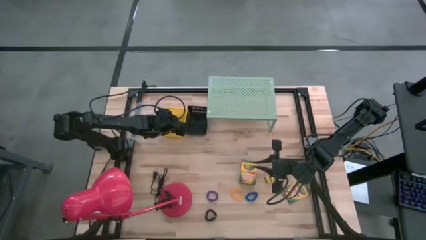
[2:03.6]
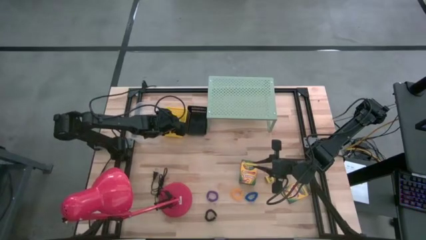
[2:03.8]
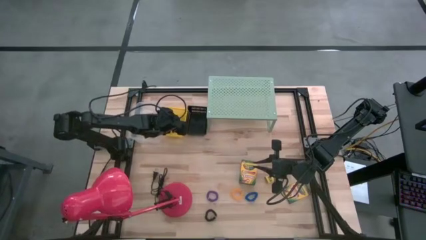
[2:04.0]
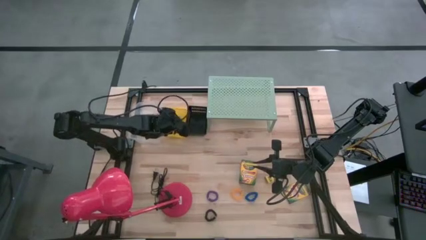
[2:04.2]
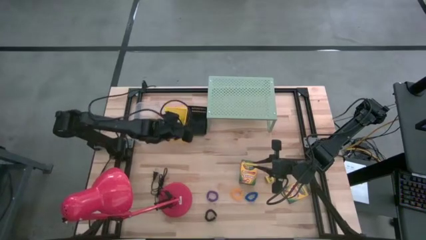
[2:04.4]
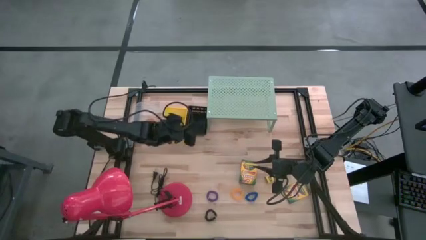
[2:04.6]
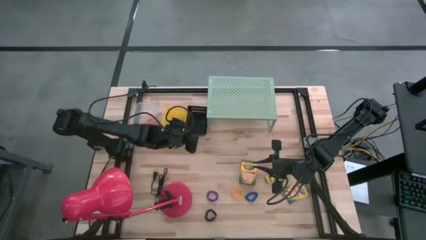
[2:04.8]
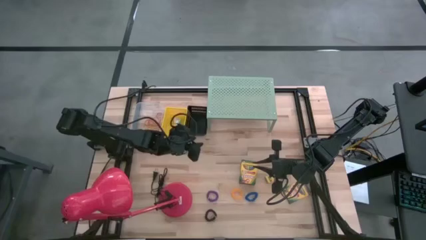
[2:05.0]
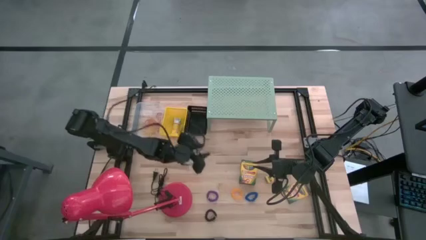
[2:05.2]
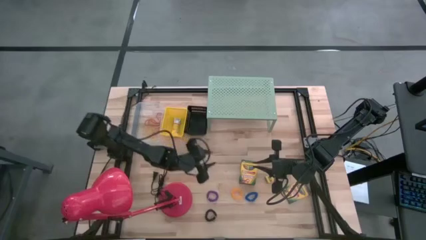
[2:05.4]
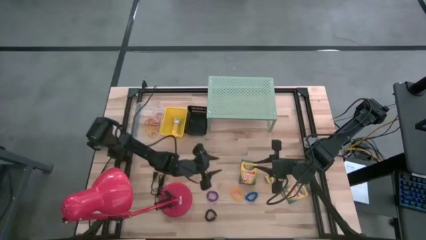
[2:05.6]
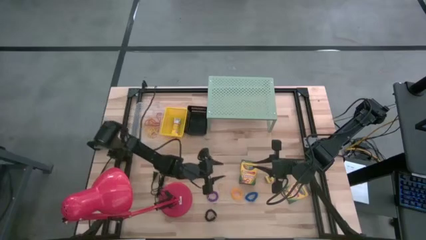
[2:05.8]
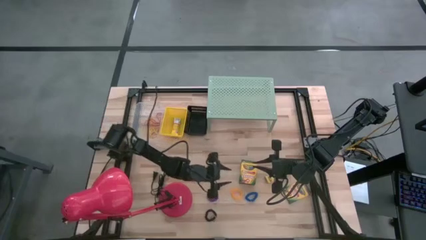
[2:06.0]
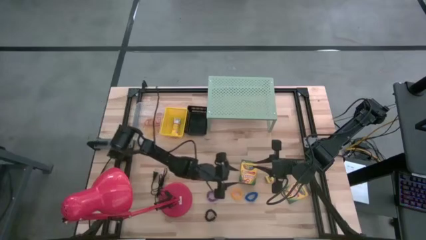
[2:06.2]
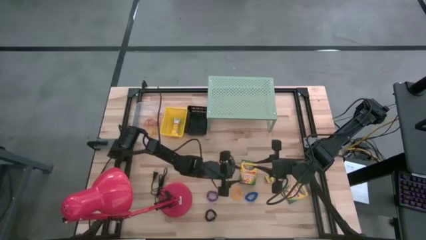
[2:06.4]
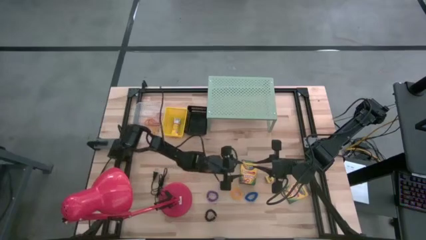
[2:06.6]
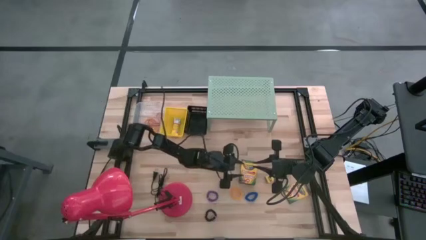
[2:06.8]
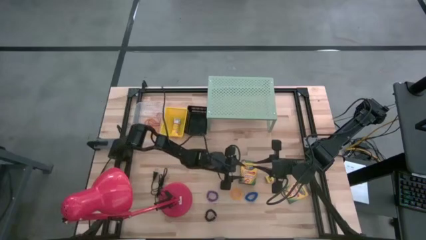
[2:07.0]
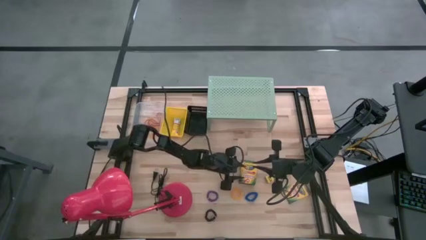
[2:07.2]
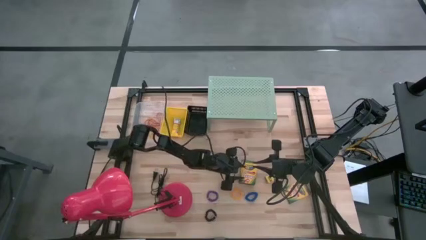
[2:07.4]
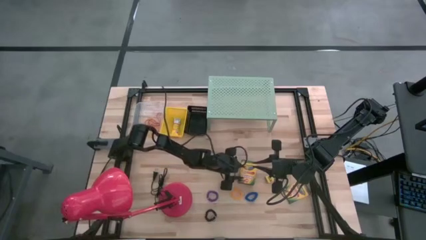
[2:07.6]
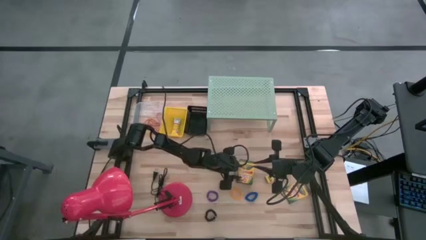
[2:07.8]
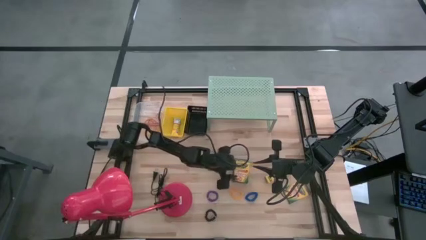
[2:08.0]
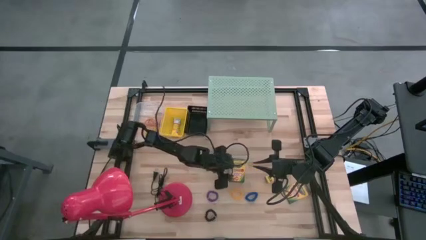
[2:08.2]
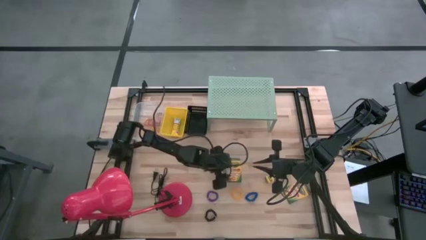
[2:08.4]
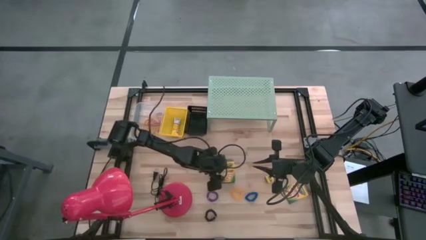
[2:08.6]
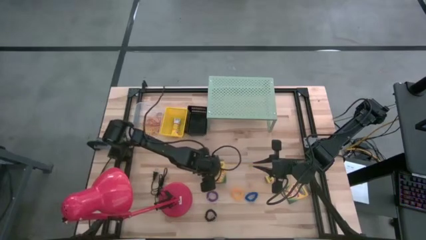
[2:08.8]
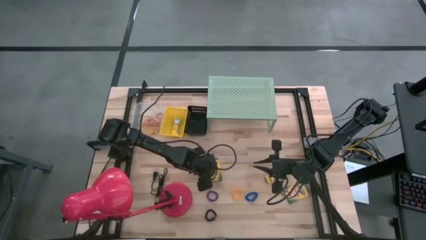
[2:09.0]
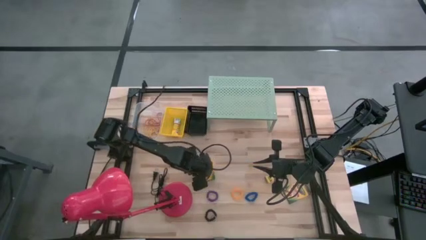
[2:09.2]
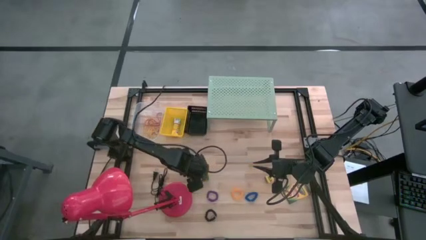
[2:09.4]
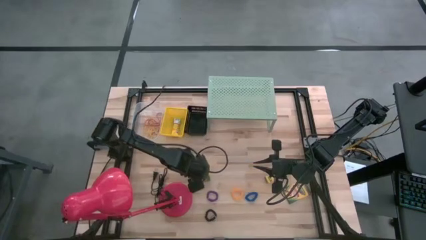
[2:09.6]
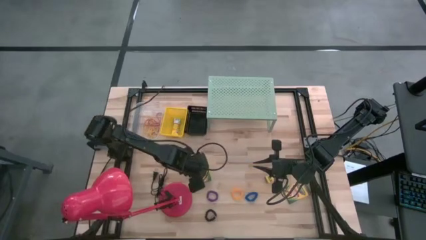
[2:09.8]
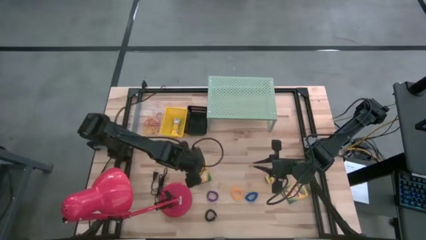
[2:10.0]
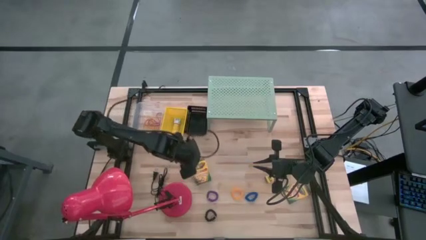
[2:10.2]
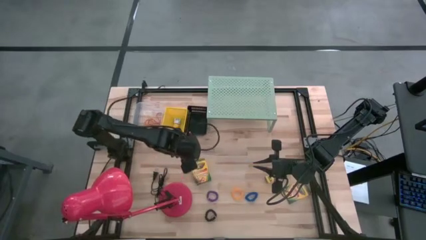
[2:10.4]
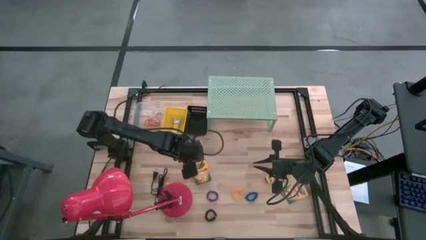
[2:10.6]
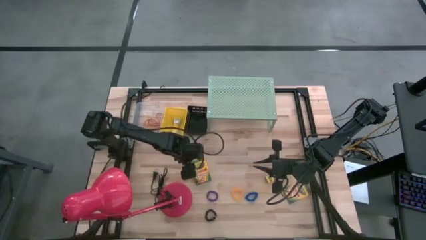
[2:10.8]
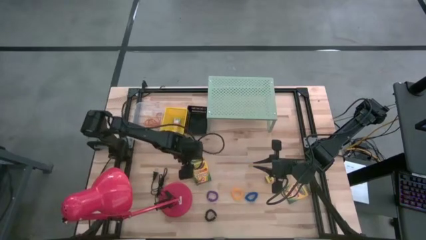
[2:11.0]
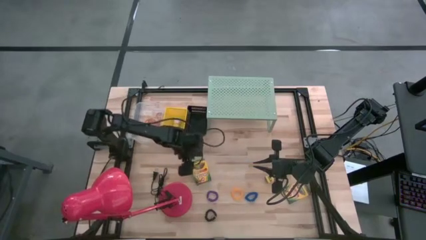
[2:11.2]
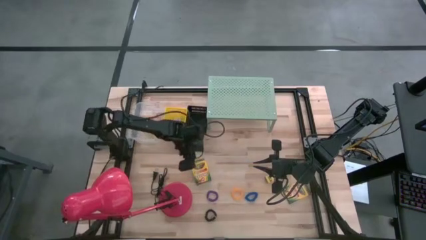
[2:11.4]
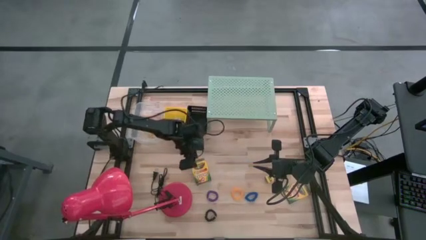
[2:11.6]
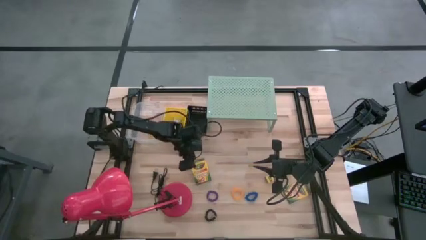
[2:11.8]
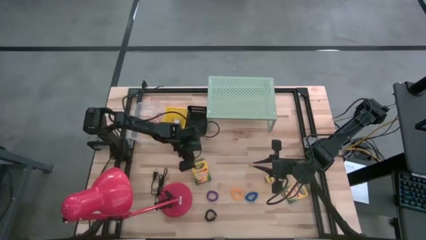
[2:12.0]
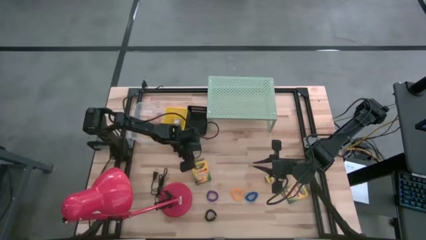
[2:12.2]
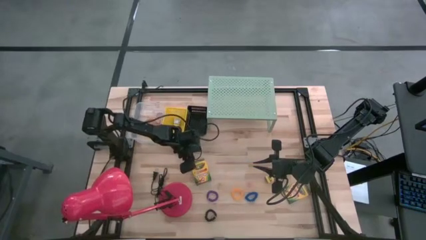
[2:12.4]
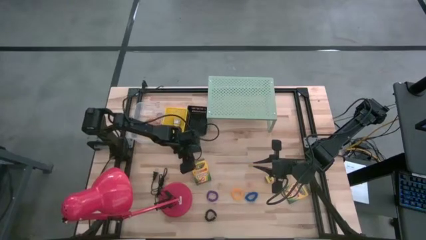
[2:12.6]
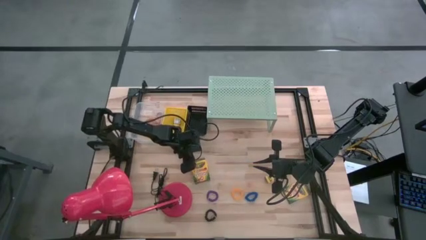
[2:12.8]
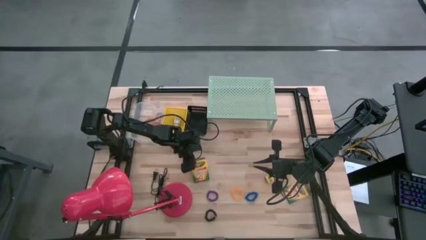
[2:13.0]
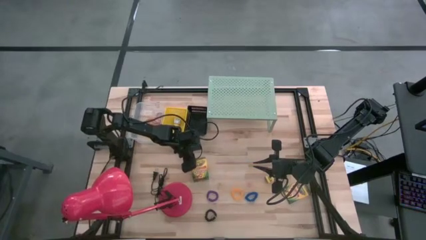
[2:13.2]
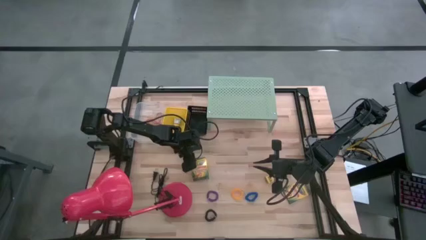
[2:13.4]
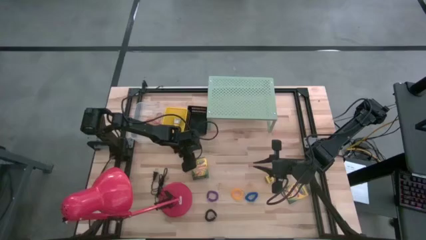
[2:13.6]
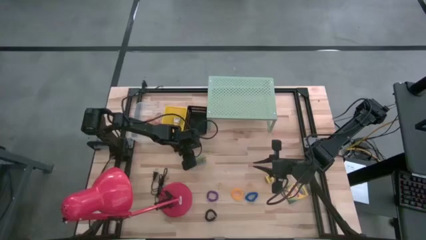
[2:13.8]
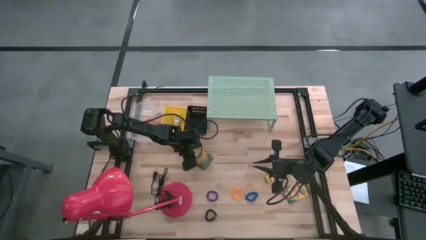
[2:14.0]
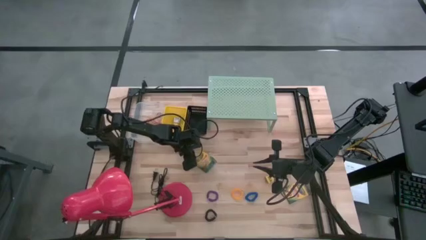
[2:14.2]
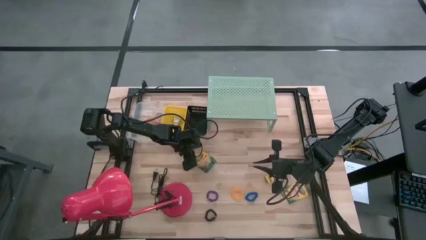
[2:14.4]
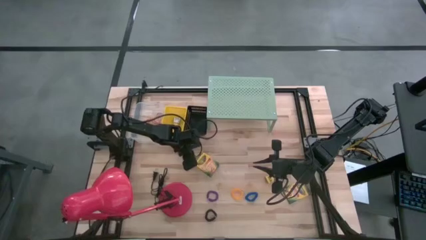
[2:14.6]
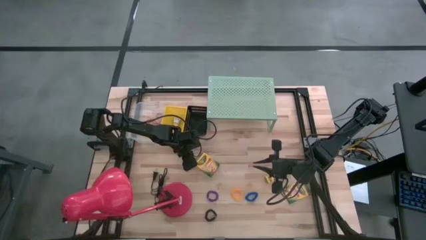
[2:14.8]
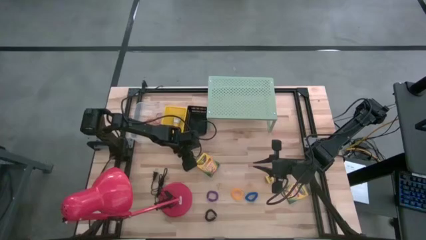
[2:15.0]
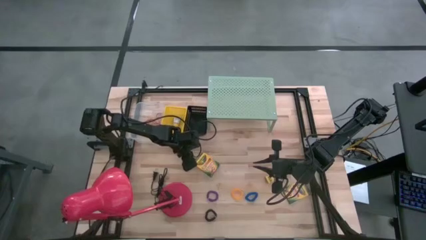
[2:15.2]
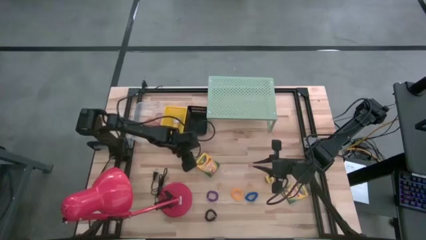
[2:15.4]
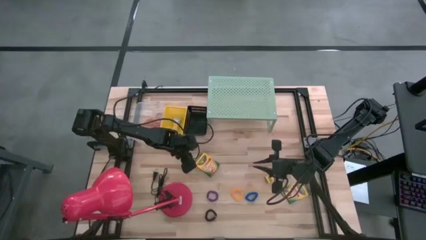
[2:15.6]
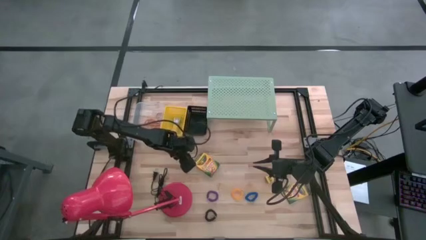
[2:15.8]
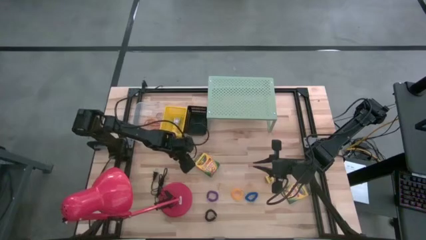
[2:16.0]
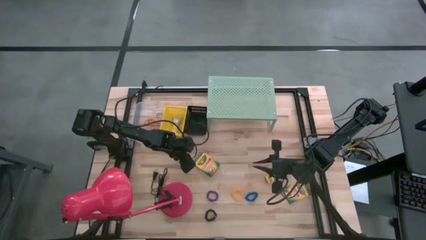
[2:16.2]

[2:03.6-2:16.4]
Task: Pick & Place Office Desk Supplies
Put the crayon into the yellow bin

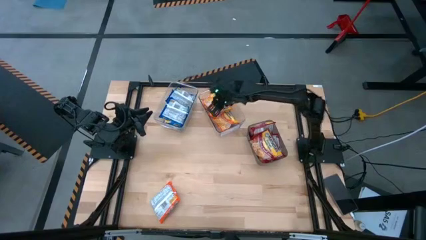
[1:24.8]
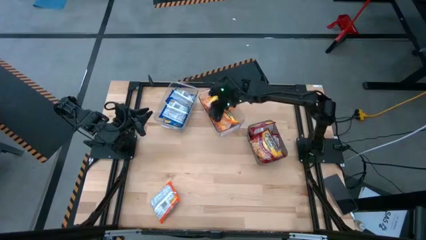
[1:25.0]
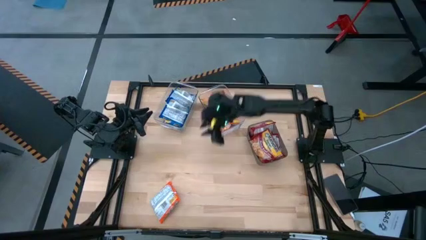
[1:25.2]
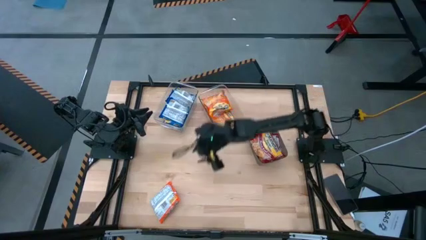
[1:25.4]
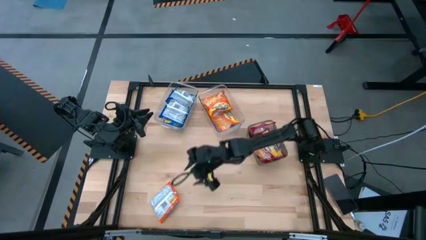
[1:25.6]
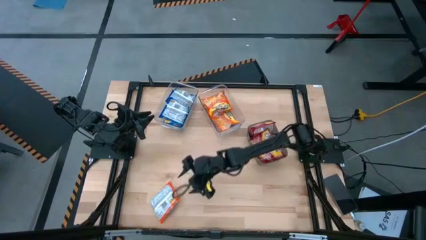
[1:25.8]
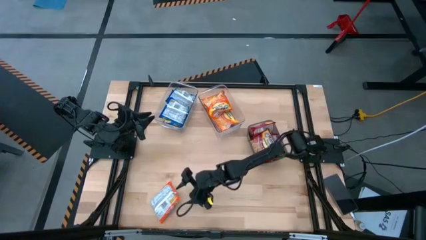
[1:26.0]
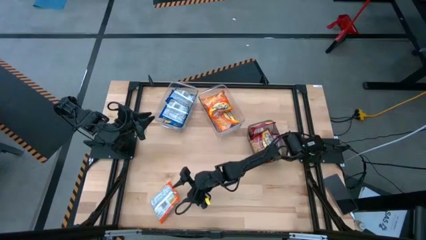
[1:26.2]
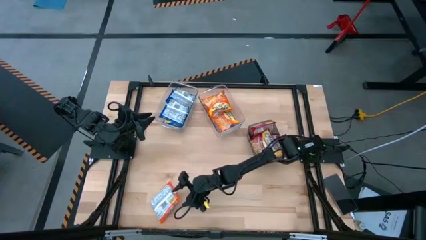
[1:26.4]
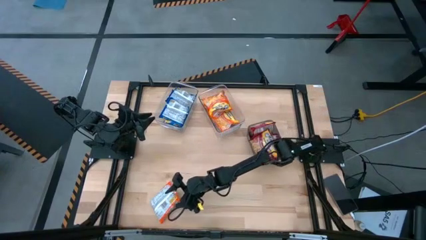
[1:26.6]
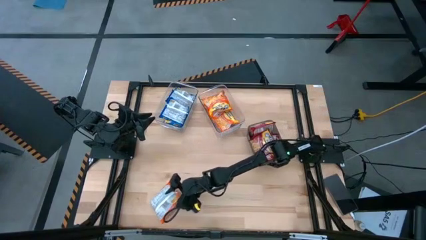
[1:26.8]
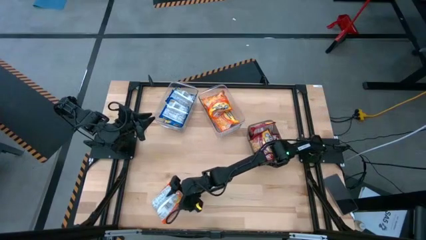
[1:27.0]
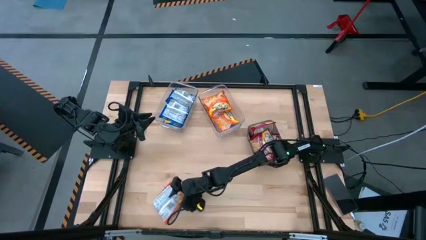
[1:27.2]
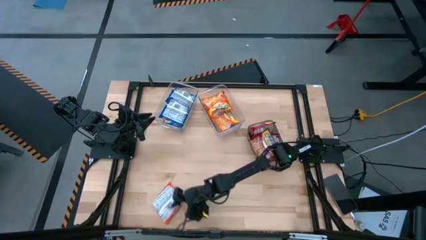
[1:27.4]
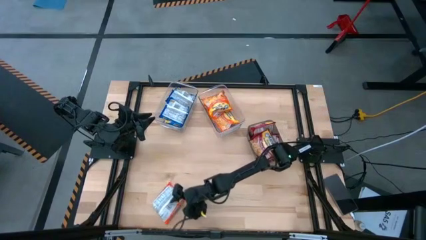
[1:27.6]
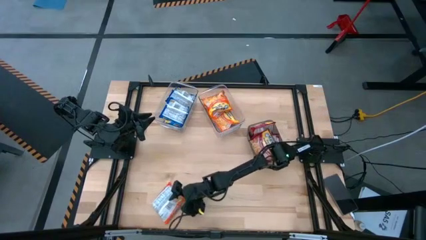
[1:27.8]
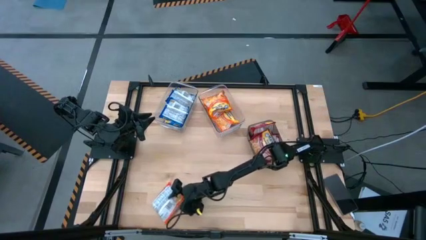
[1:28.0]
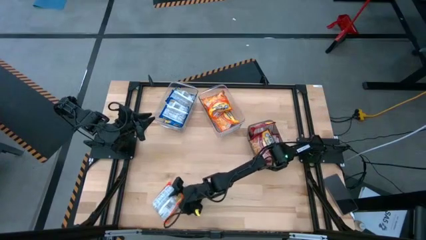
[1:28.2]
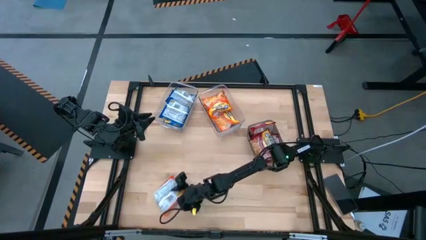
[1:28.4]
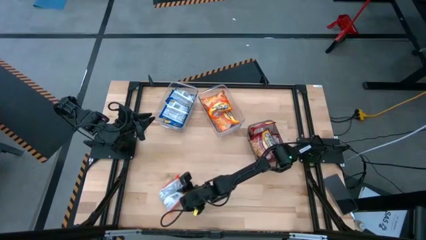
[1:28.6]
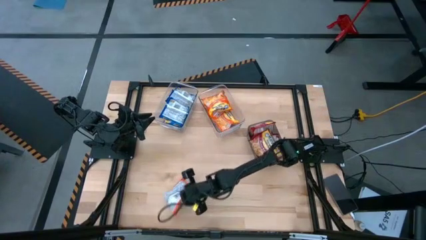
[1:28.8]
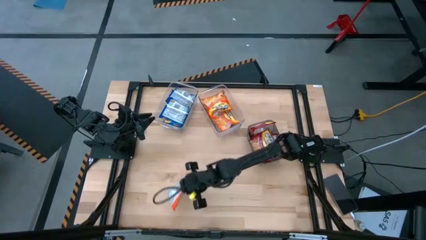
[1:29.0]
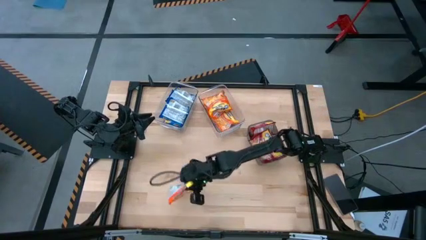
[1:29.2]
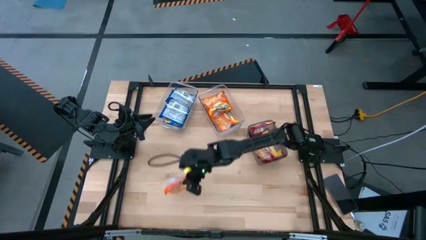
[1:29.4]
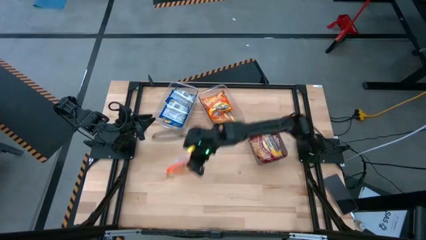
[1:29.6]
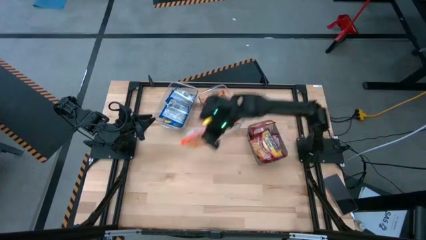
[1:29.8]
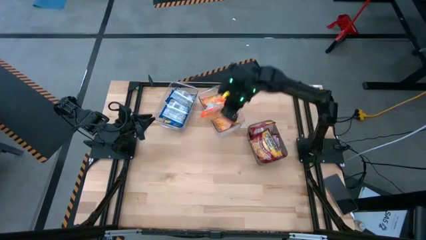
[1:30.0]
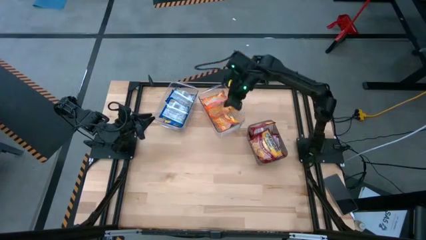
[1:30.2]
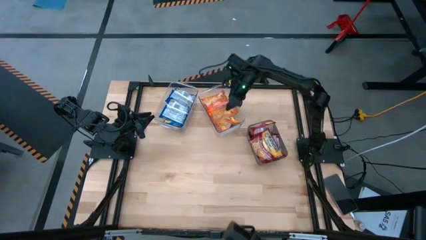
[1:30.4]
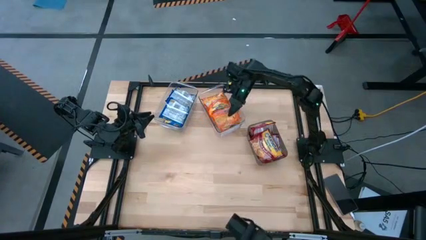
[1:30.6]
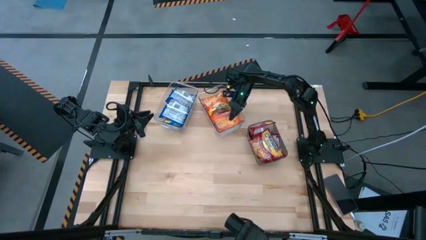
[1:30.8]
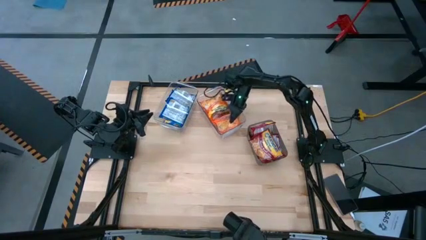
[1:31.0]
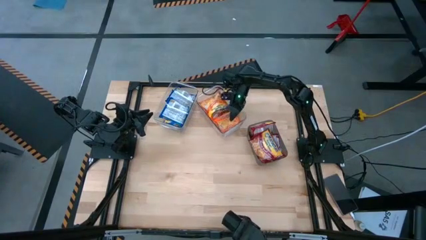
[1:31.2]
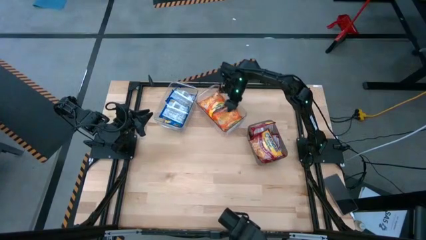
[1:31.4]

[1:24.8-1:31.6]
Task: Sort Maruchan noodles
Put the orange noodle pack into the right transparent bin
